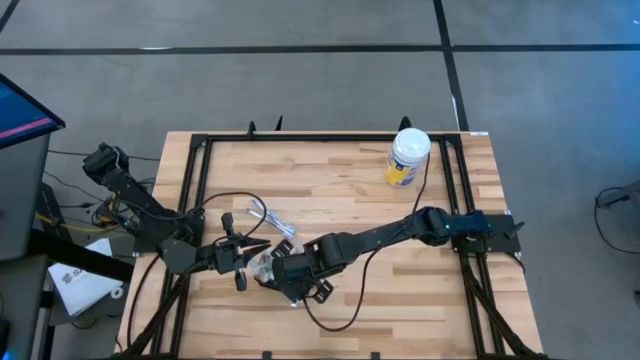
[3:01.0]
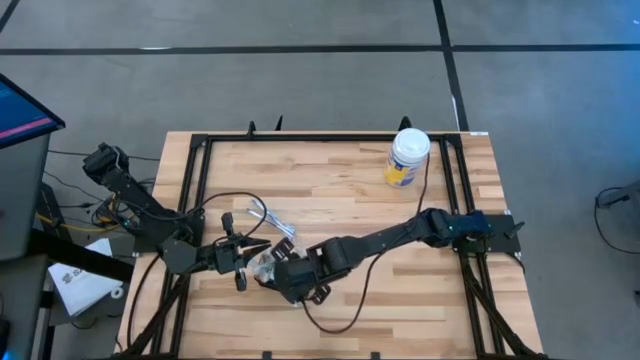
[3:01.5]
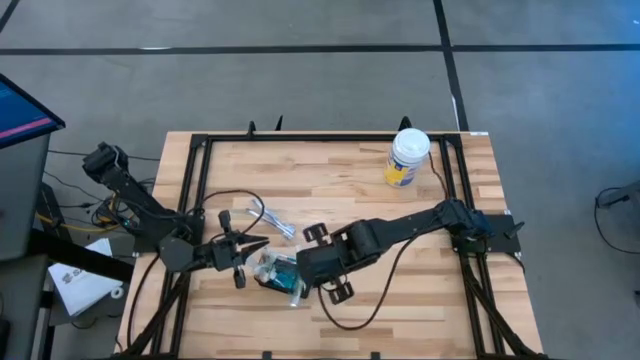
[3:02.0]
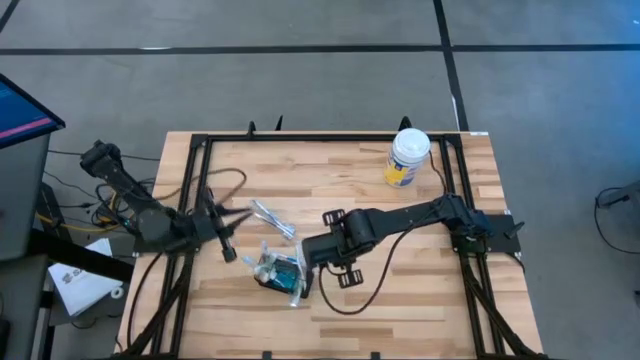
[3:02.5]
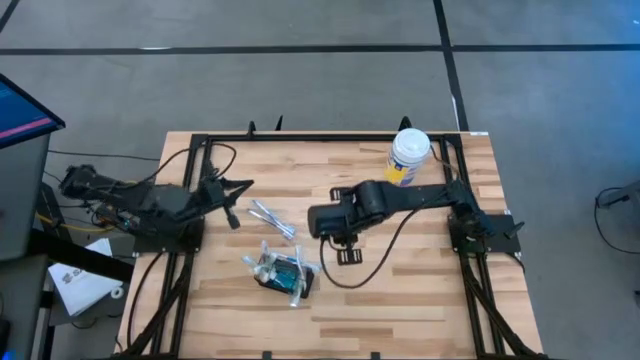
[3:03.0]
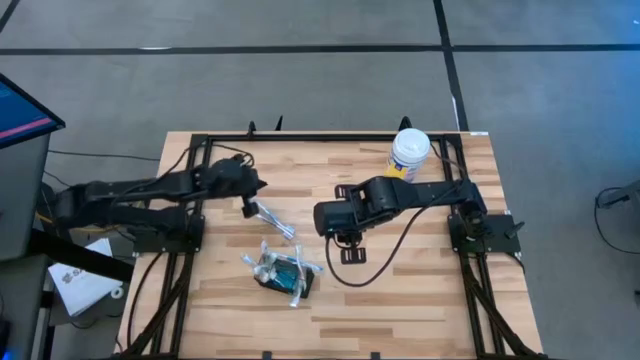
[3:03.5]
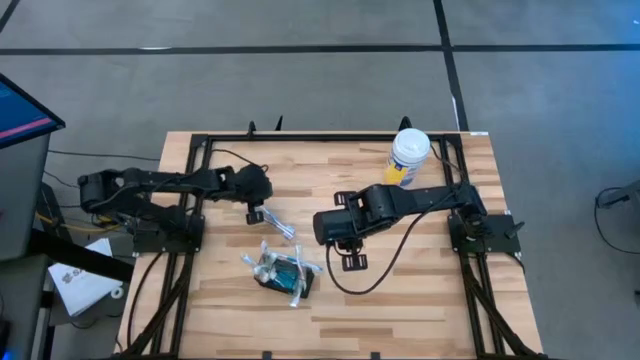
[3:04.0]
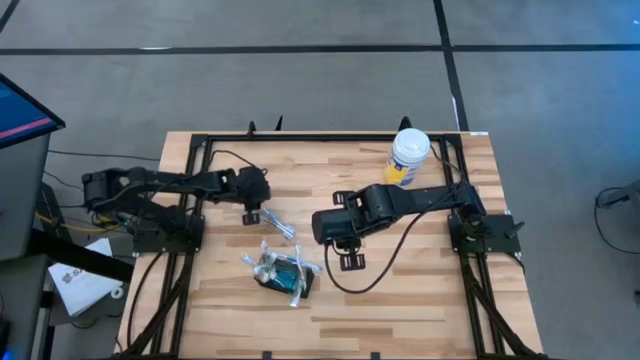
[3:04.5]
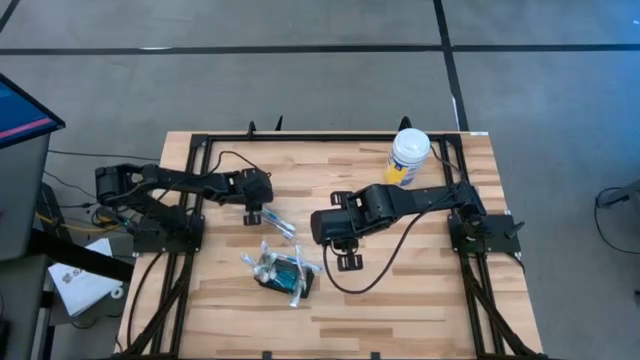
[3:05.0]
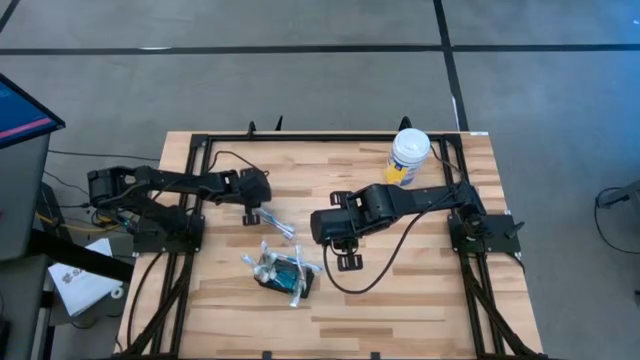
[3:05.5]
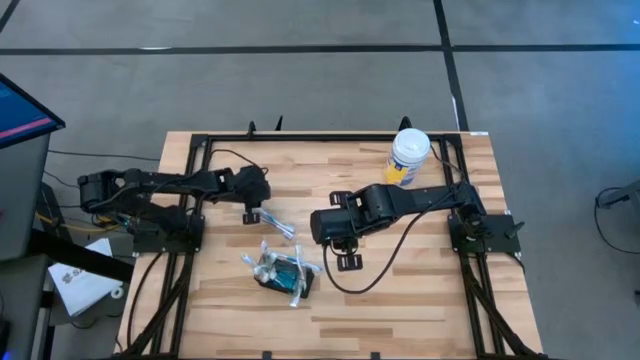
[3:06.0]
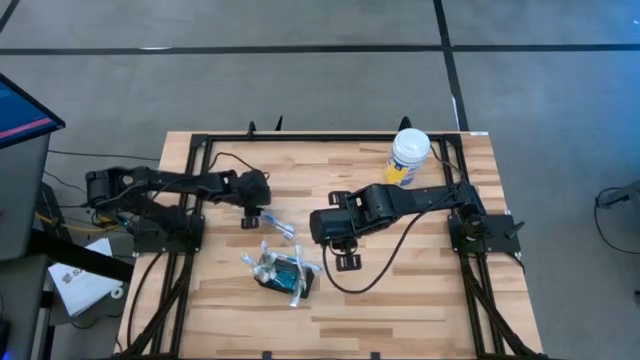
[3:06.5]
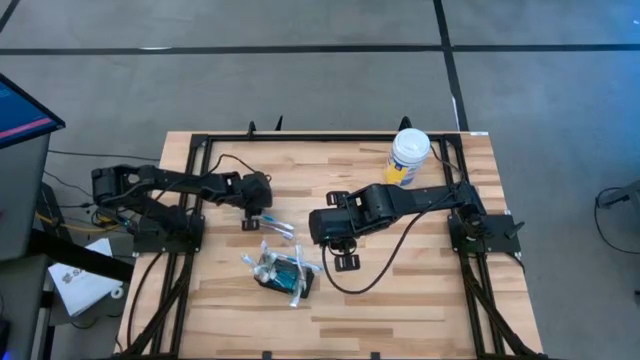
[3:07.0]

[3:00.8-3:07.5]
Task: Pick & Place toothbrushing station
Put the blue toothbrush into the mesh organizer

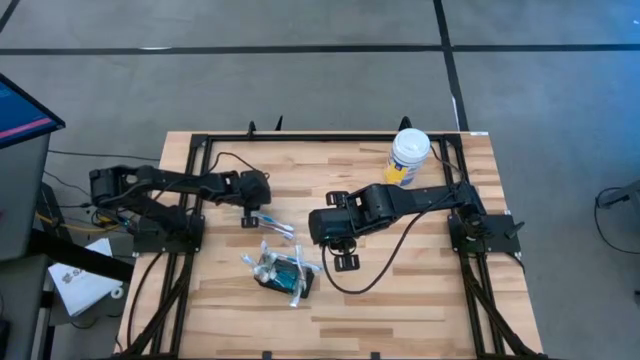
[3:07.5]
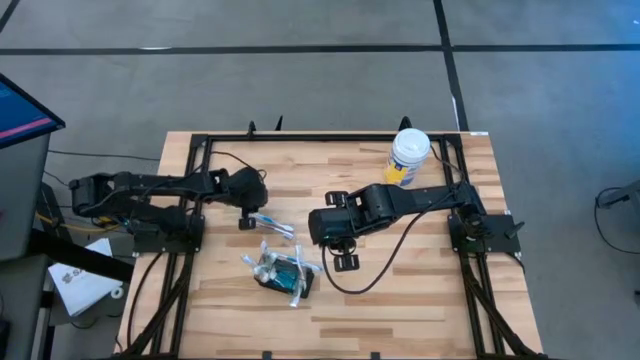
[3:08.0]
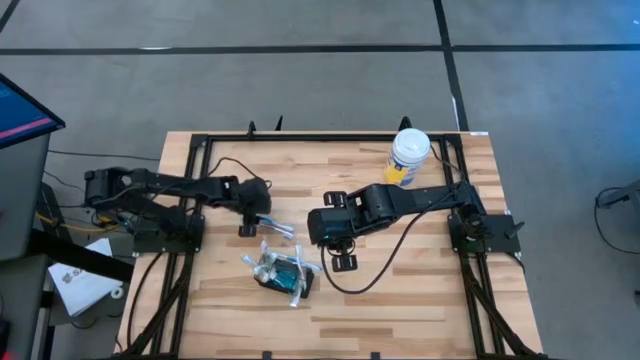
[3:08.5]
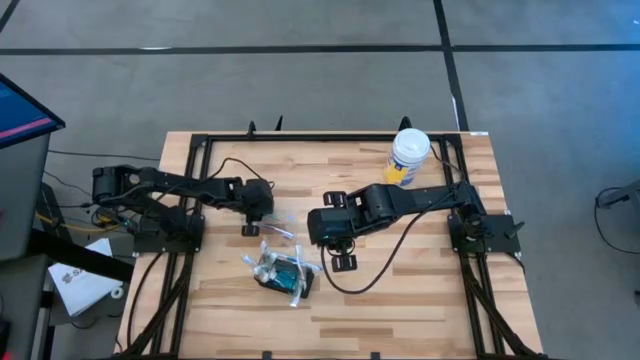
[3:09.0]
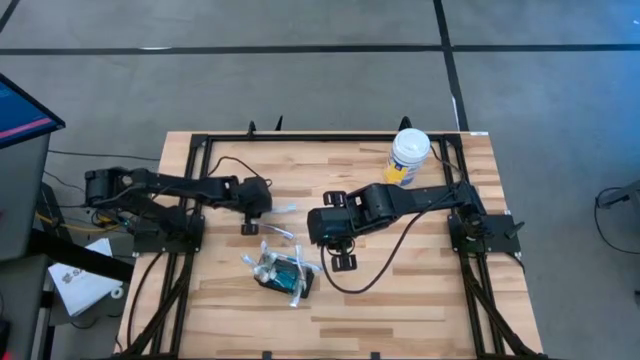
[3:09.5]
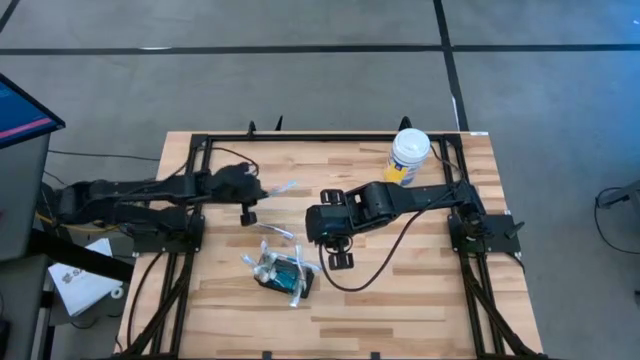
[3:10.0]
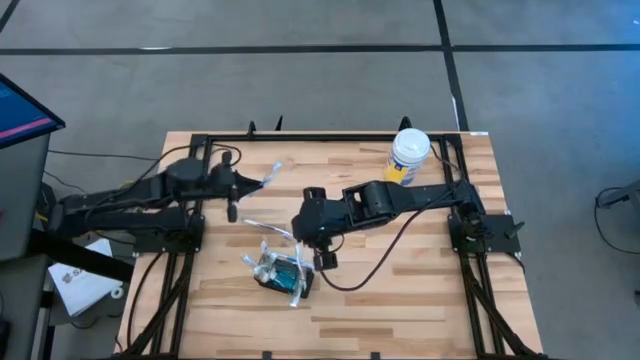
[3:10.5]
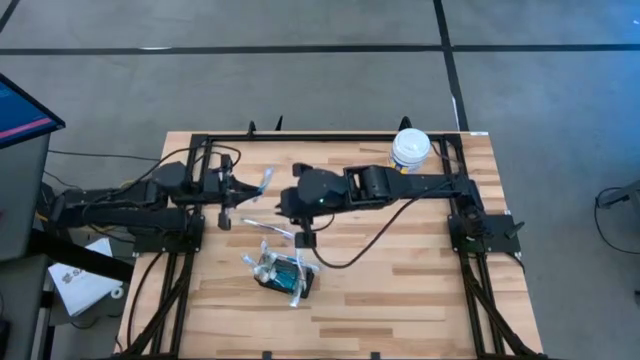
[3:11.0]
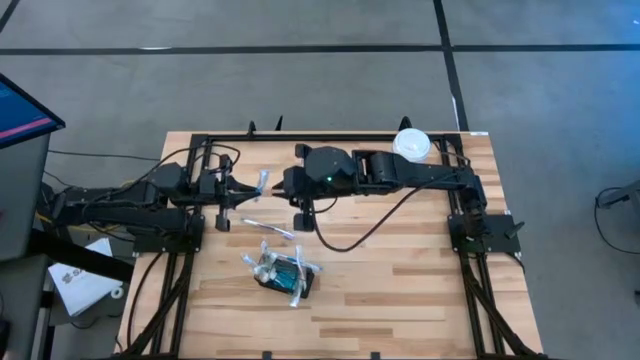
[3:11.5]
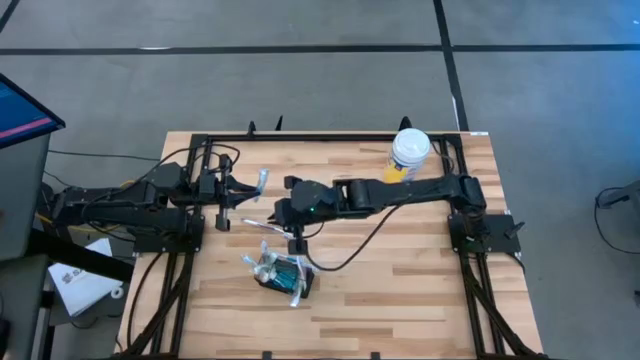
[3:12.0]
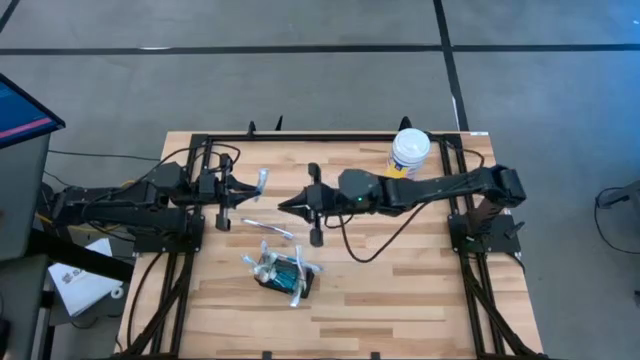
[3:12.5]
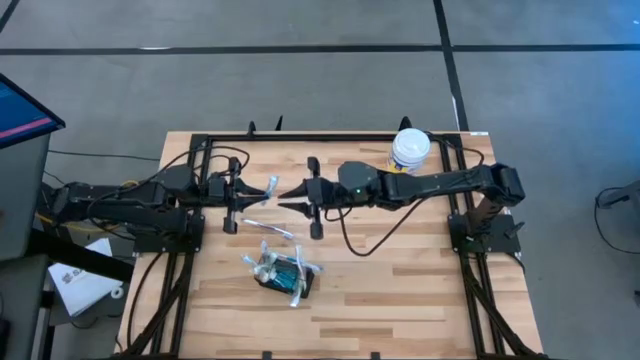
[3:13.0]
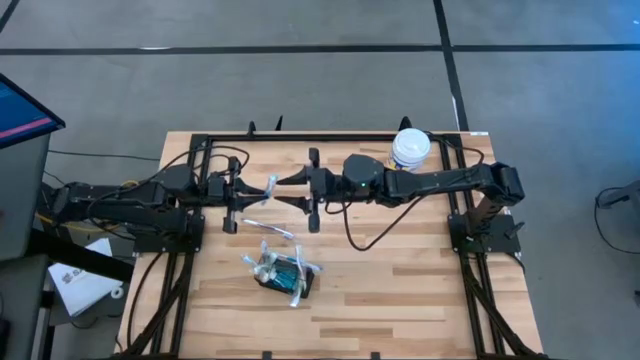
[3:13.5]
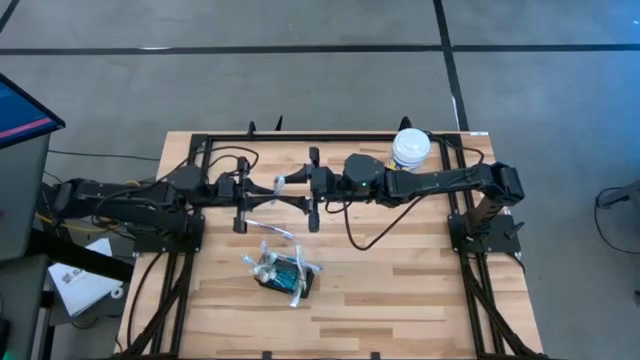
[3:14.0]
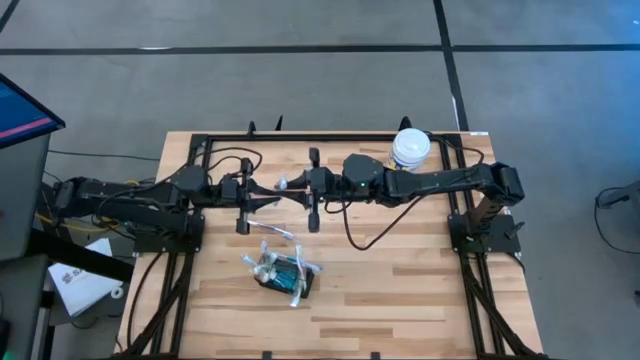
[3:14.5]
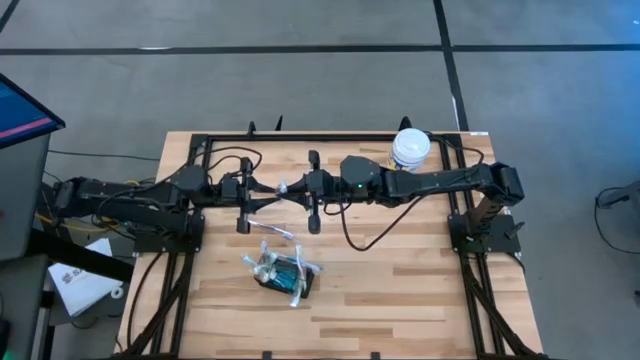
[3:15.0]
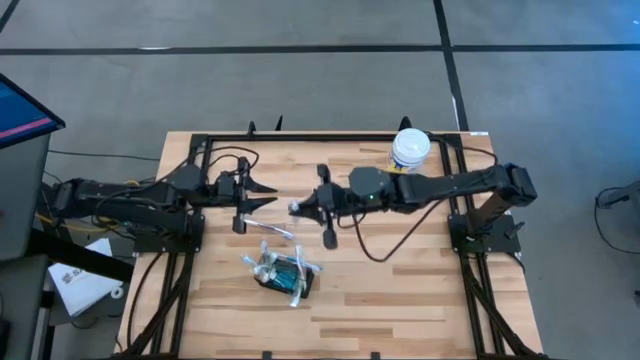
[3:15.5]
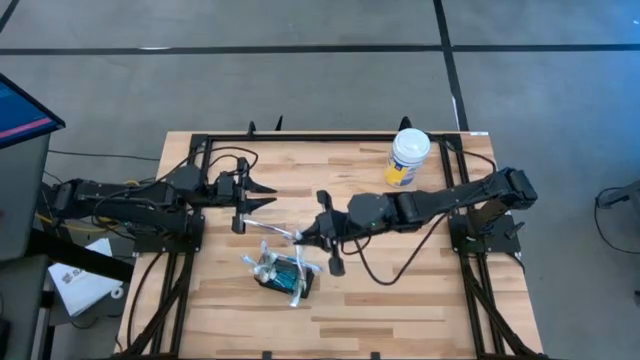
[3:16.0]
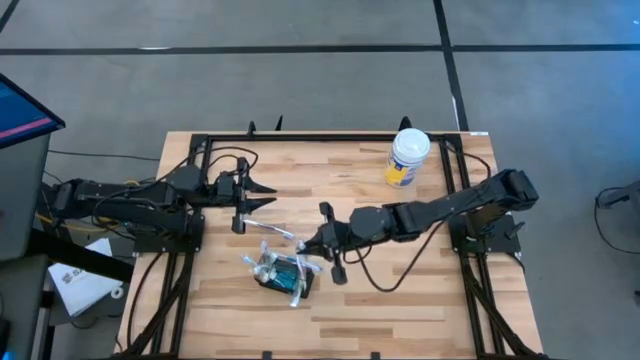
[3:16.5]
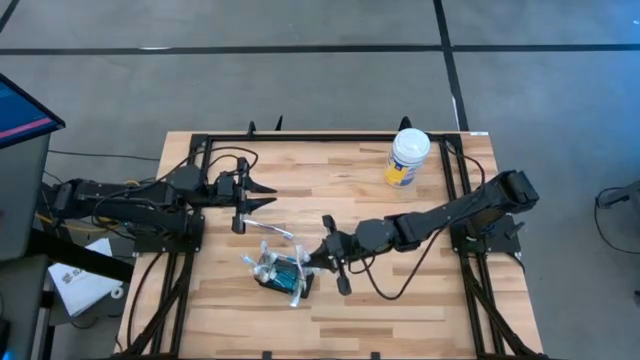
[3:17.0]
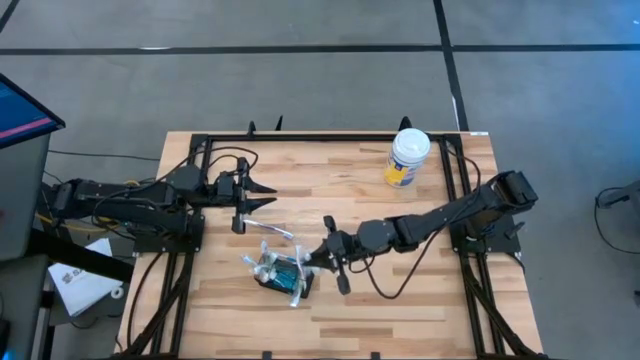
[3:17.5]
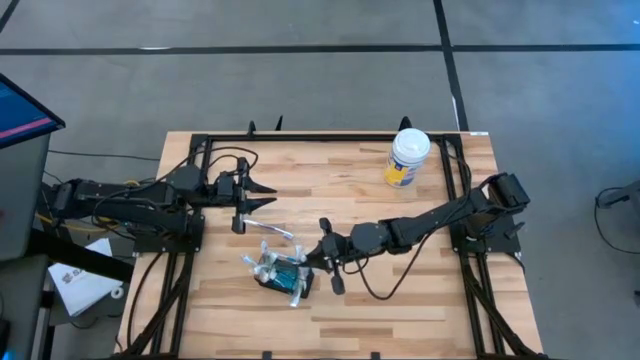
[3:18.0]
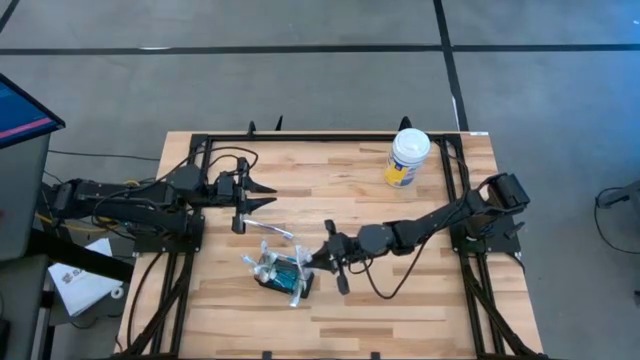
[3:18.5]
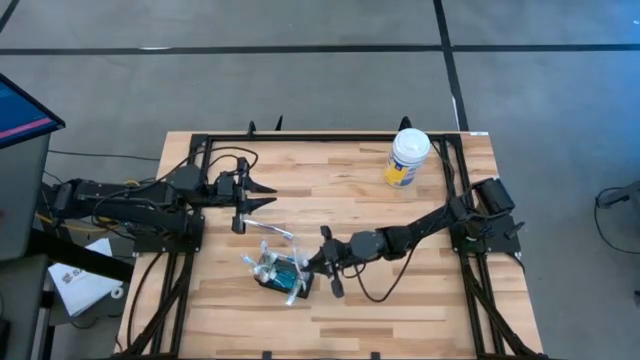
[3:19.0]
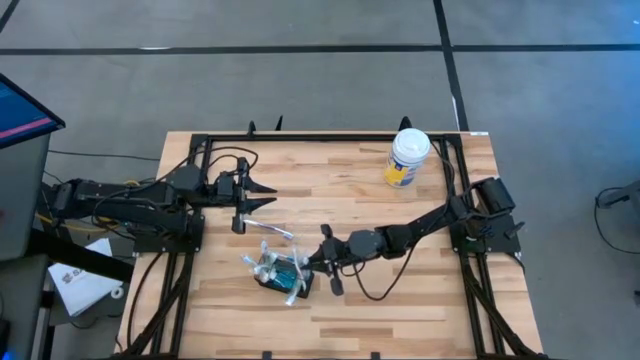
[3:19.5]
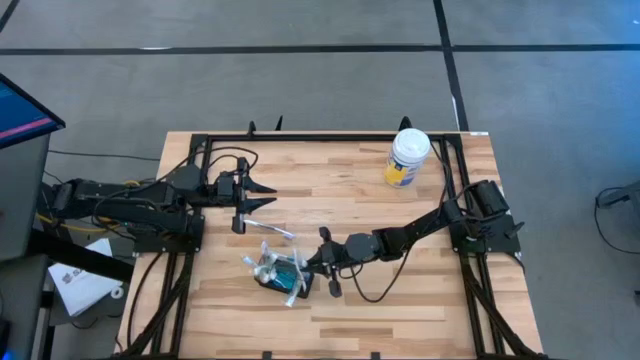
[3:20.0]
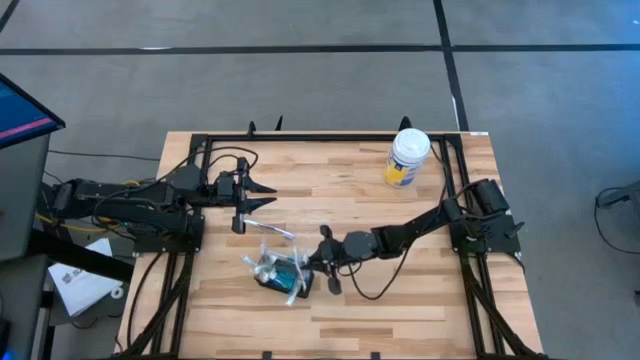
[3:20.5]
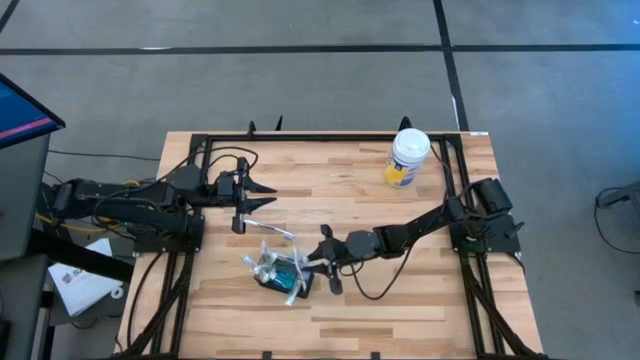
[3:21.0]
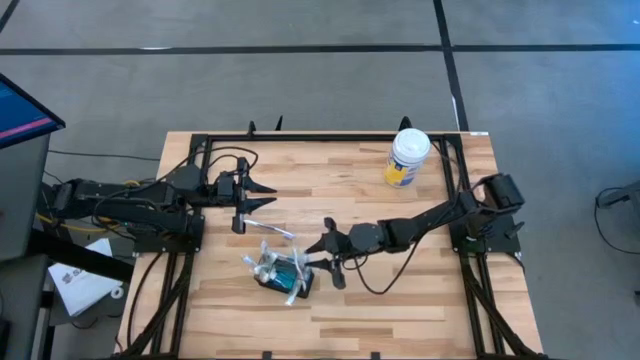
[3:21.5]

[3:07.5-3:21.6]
Put the blue toothbrush into the mesh organizer
